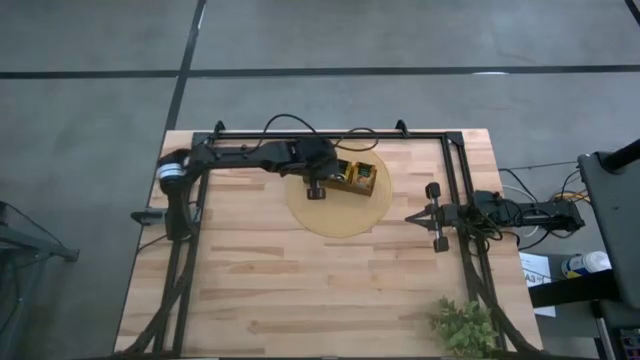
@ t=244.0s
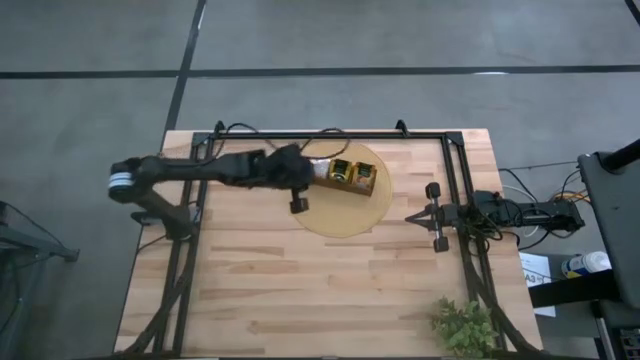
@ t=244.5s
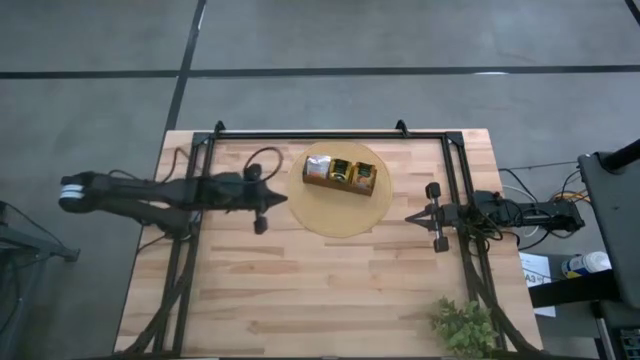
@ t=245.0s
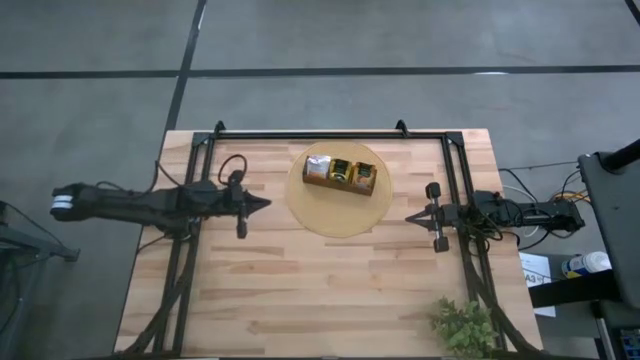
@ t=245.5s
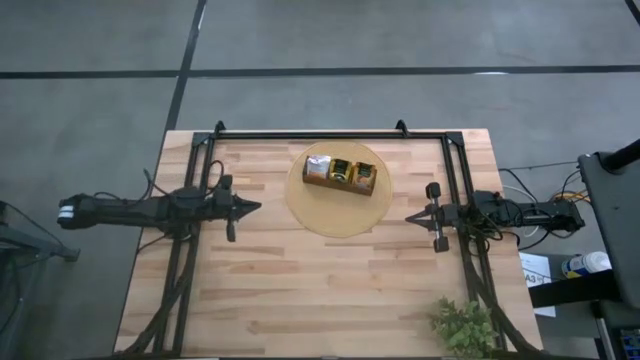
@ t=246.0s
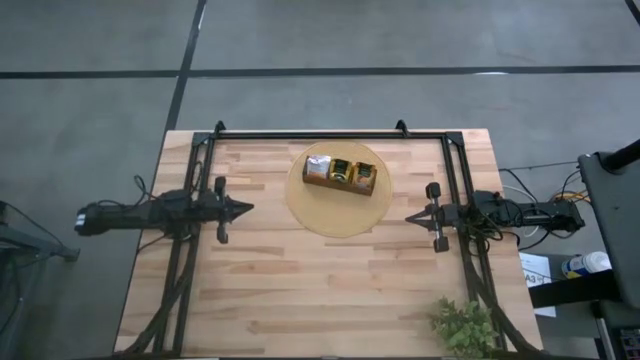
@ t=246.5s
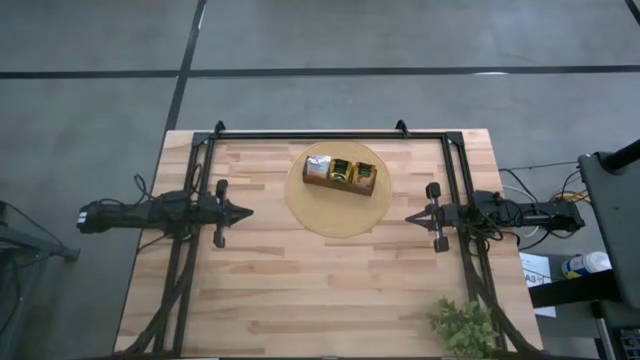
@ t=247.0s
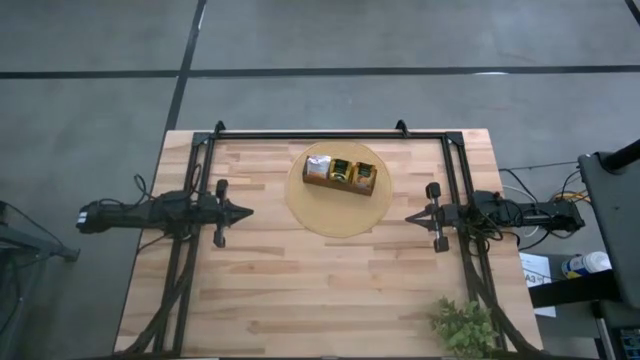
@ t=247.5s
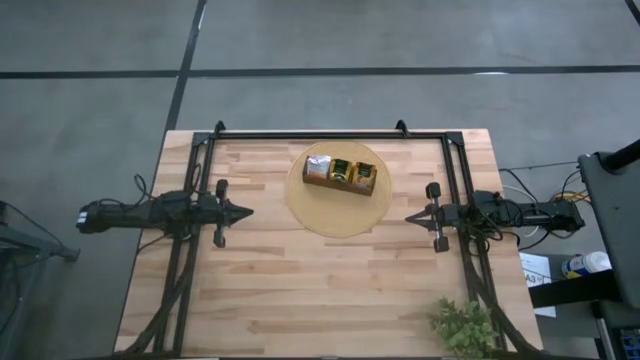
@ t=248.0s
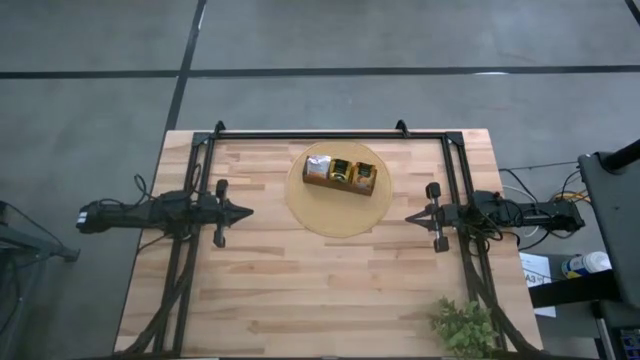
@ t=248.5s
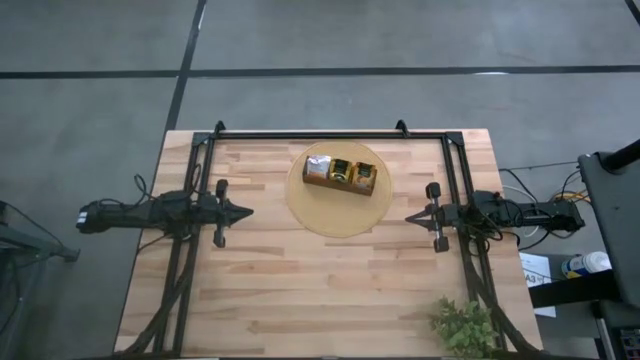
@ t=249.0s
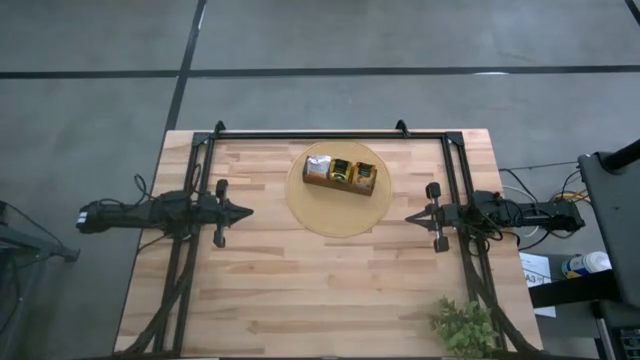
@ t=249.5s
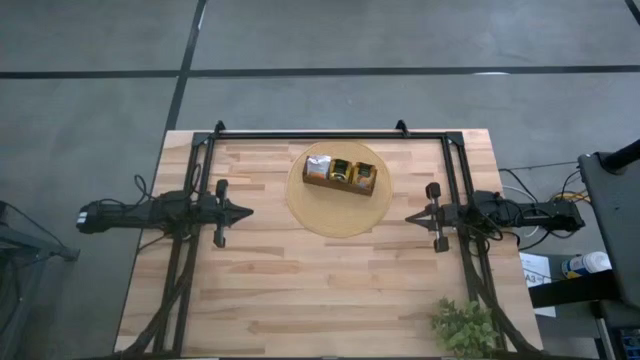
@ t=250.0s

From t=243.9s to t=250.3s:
Task: Pick & Place Tea
Return to Home Position

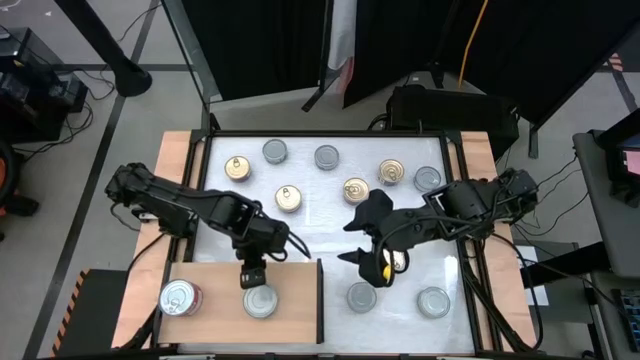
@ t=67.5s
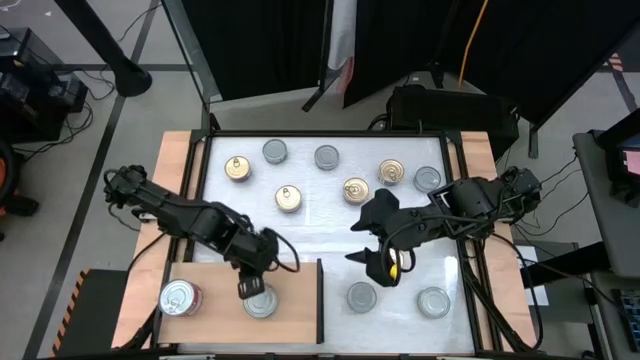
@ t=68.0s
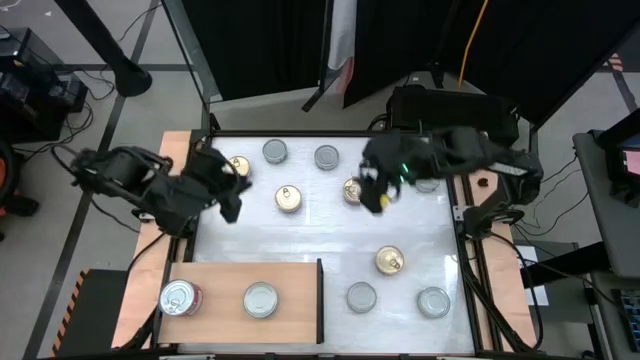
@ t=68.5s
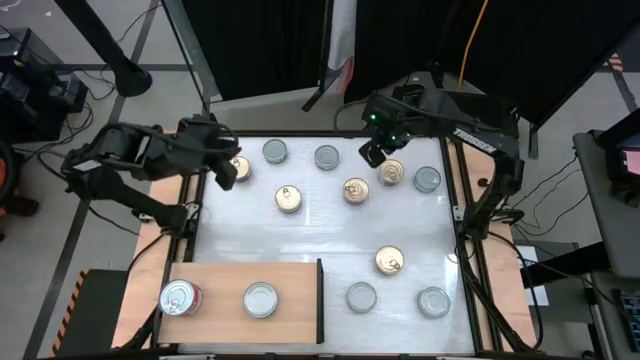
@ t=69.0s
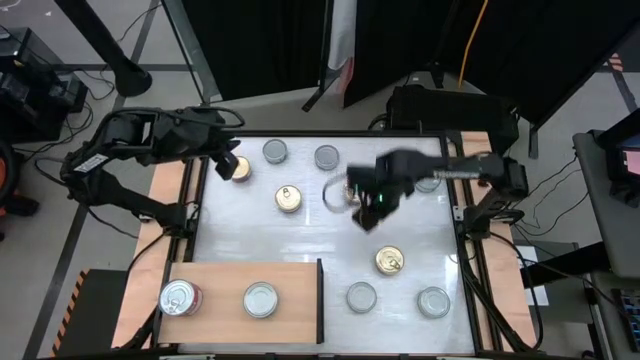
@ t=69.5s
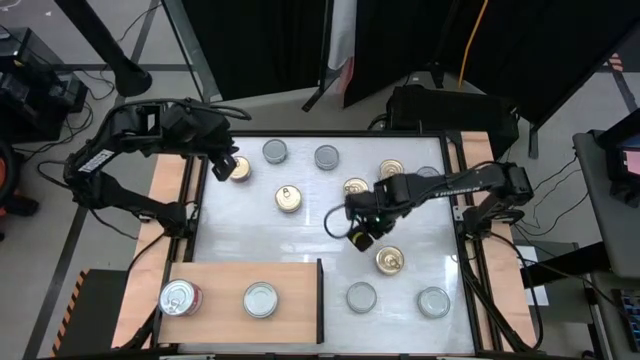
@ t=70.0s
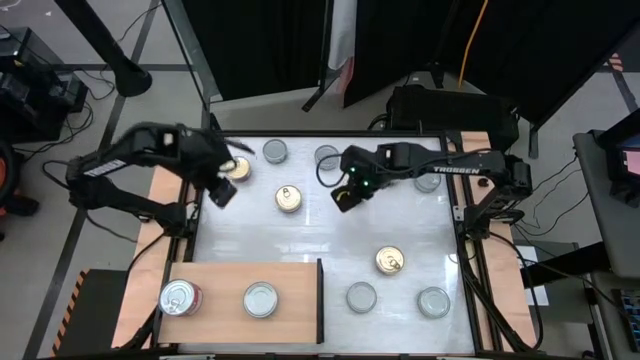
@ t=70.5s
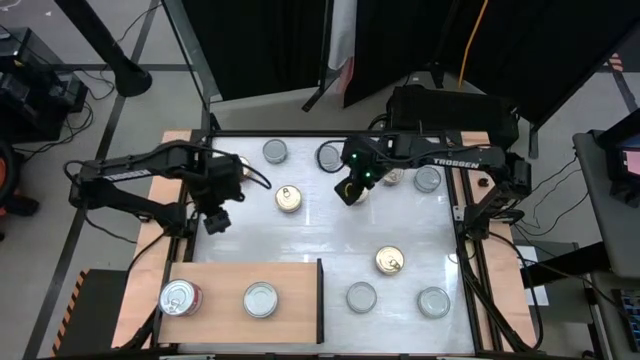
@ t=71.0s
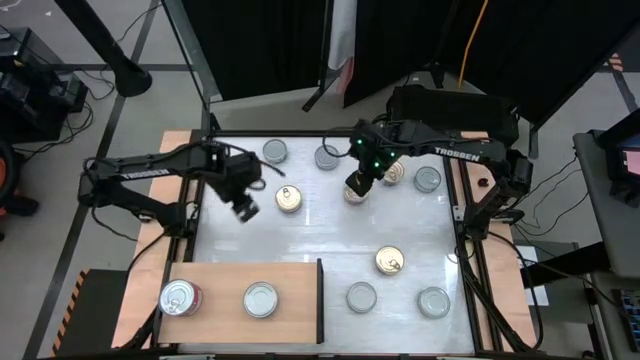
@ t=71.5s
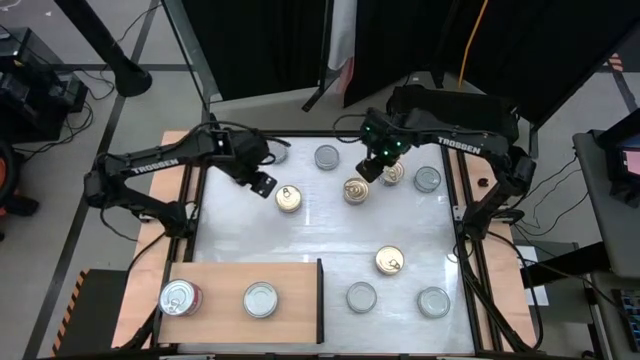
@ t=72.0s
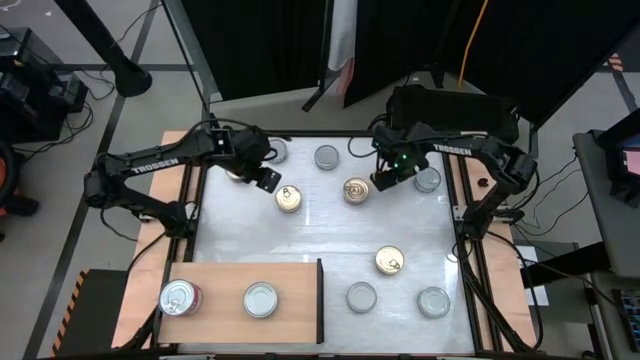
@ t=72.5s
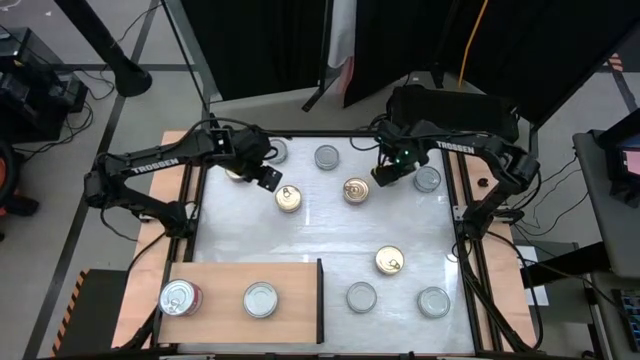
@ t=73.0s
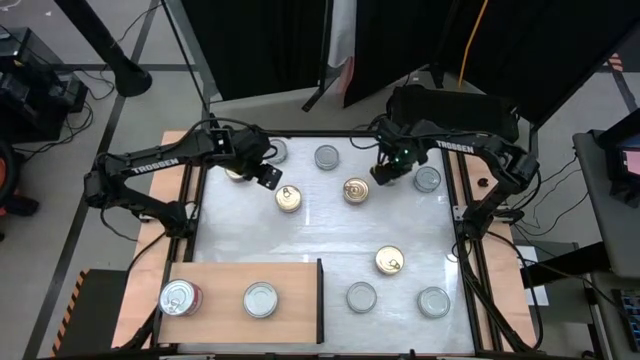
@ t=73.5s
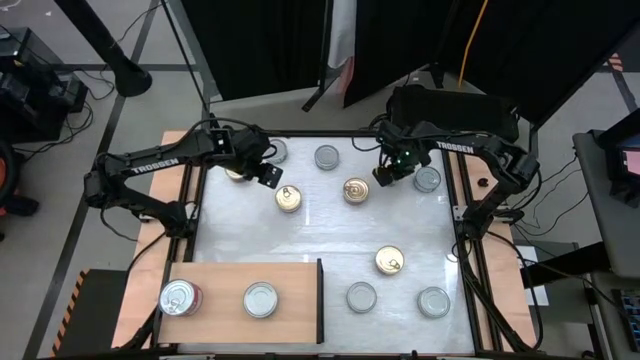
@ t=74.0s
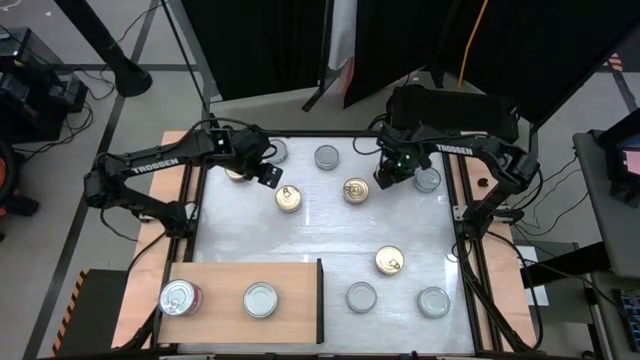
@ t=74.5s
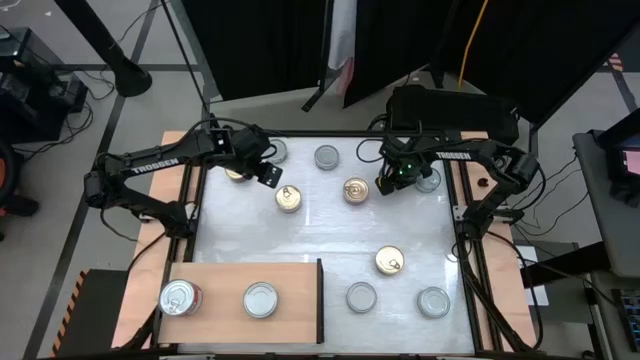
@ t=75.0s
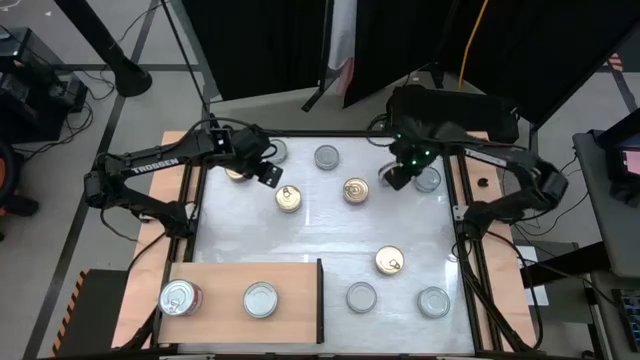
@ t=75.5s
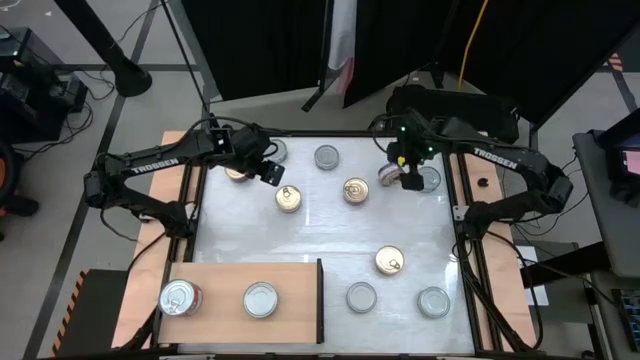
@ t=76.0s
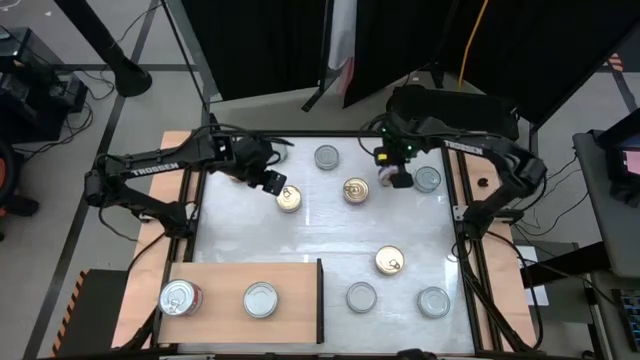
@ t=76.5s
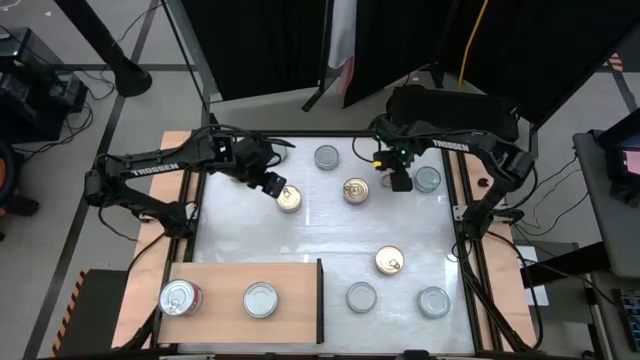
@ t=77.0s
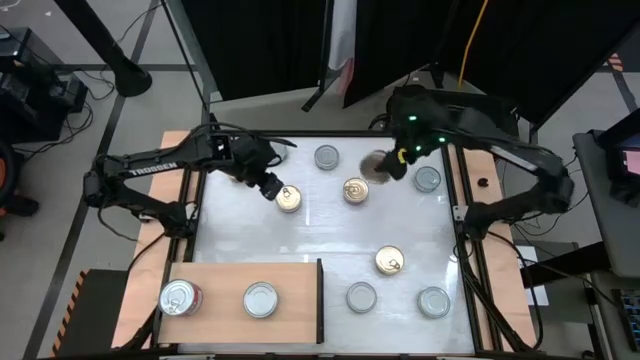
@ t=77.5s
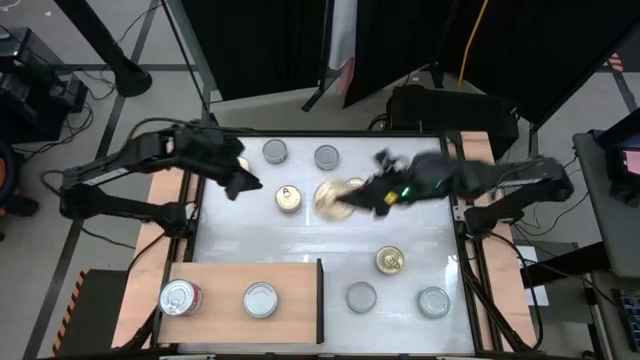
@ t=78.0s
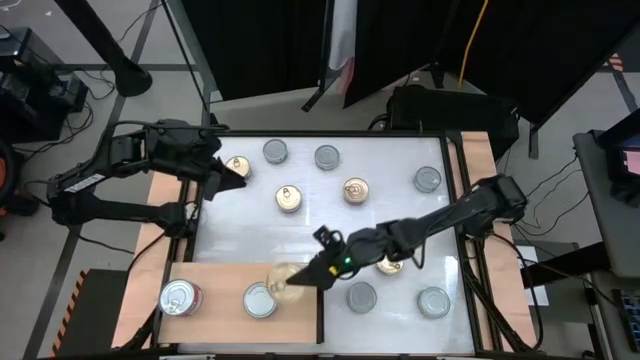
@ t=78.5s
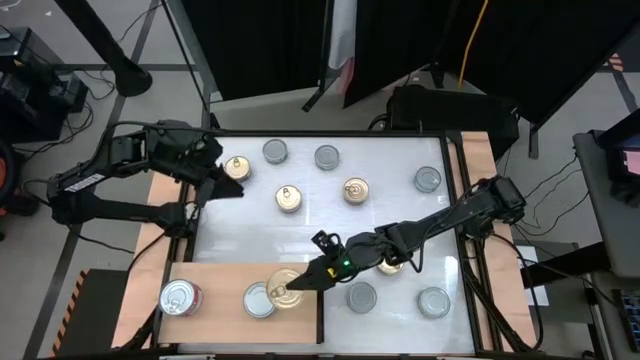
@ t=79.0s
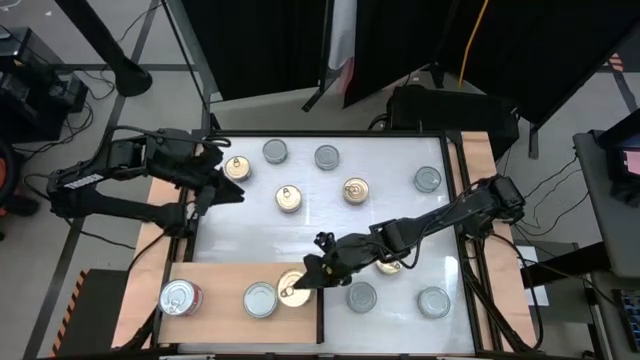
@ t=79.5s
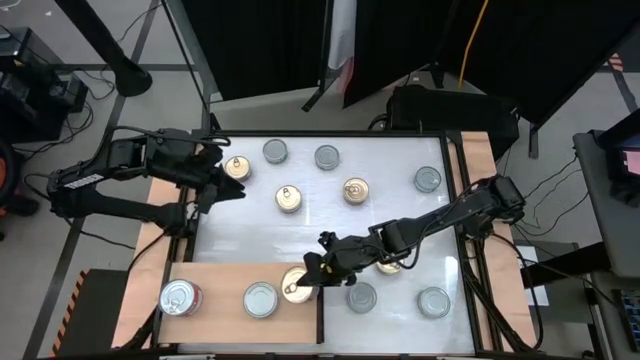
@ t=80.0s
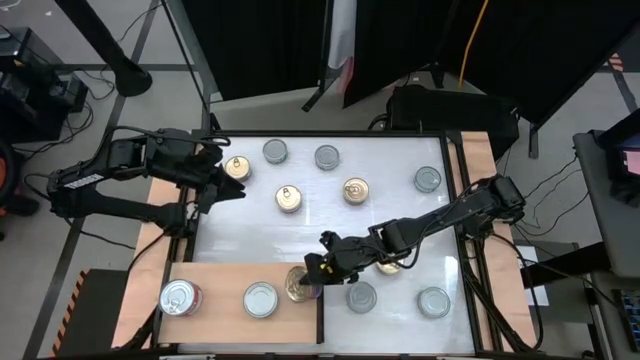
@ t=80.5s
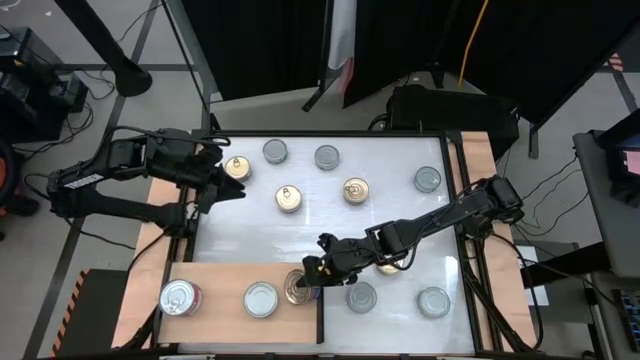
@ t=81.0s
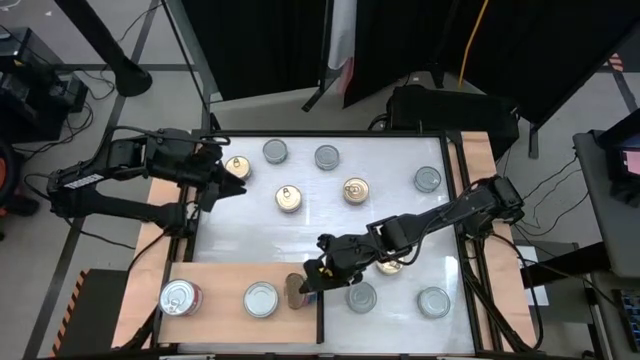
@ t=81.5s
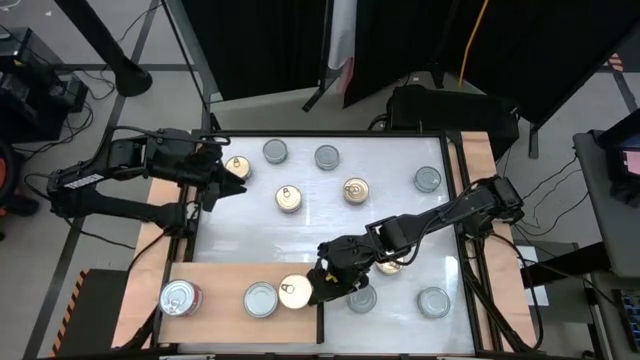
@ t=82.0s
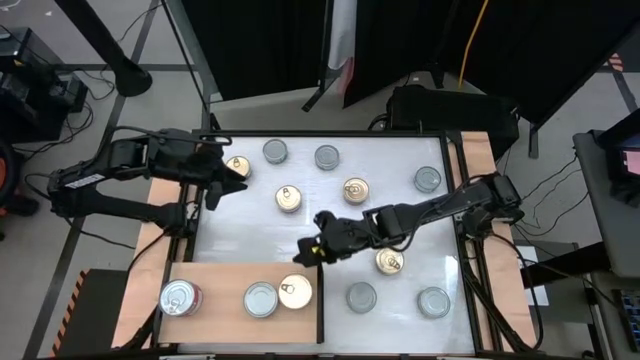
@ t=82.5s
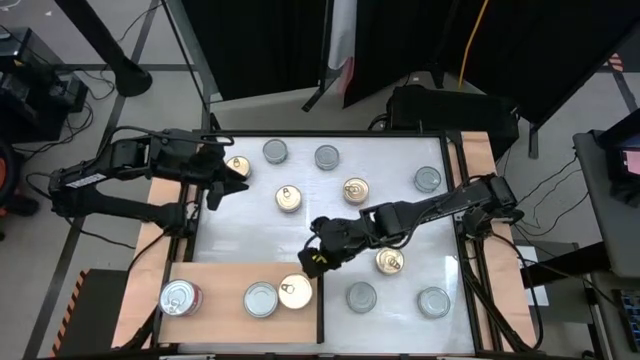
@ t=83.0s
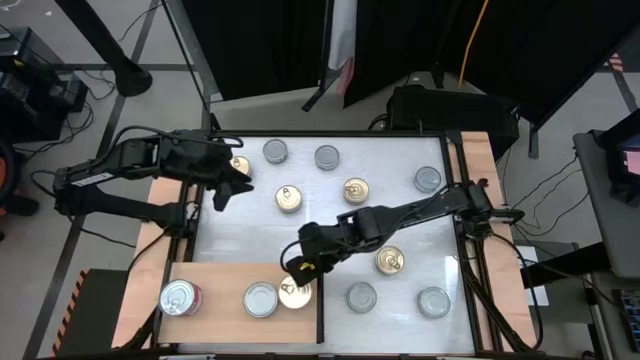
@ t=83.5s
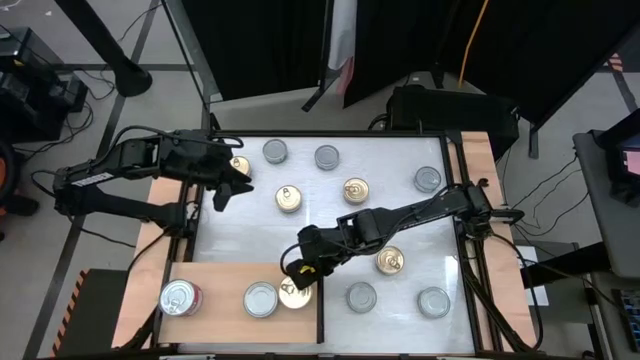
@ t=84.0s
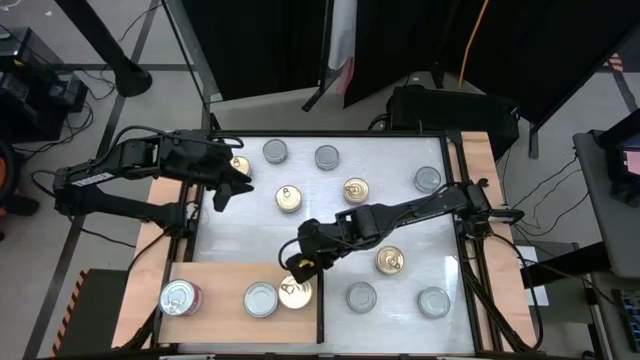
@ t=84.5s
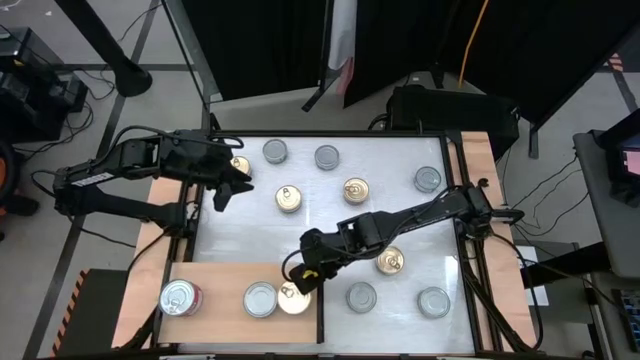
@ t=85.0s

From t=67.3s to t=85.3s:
Task: Stack canned seafood by type on shelf
Put the blue pink tuna can on the shelf
